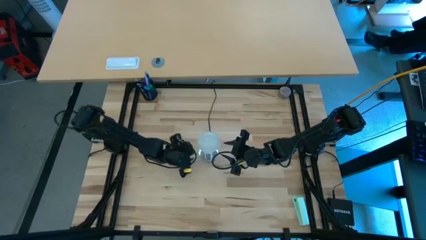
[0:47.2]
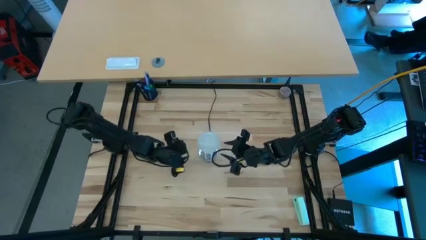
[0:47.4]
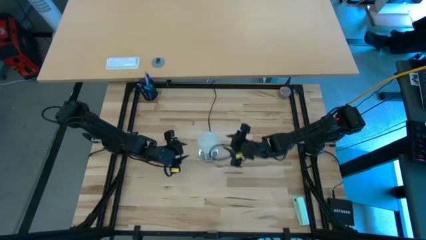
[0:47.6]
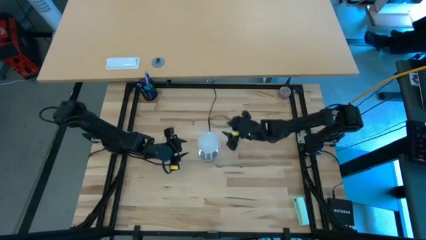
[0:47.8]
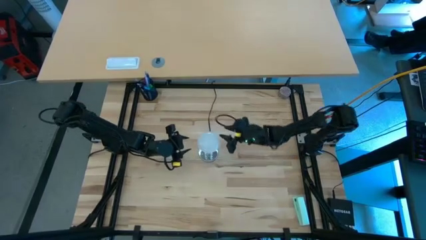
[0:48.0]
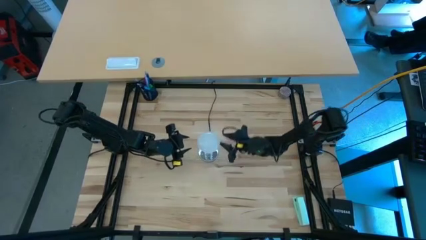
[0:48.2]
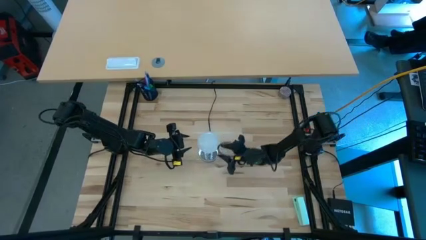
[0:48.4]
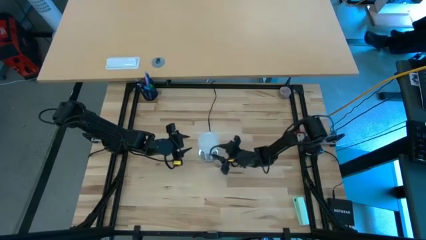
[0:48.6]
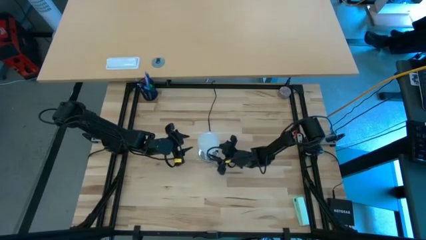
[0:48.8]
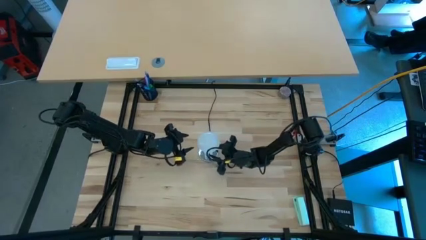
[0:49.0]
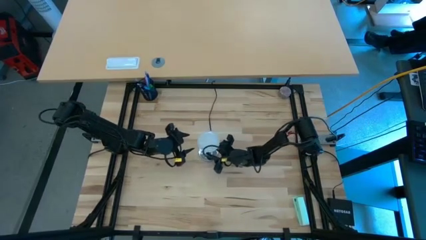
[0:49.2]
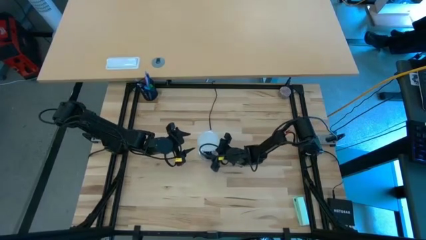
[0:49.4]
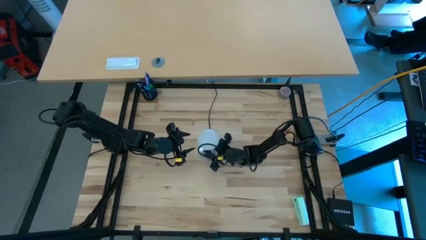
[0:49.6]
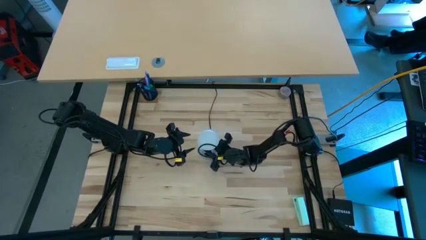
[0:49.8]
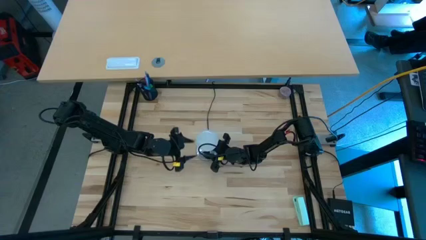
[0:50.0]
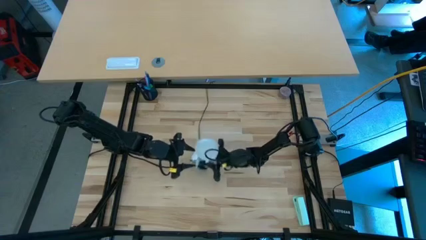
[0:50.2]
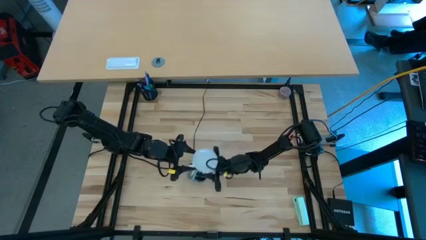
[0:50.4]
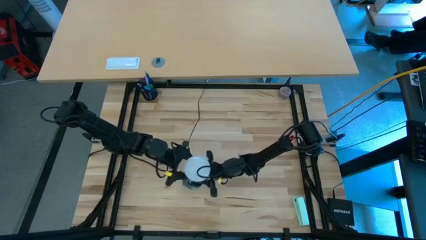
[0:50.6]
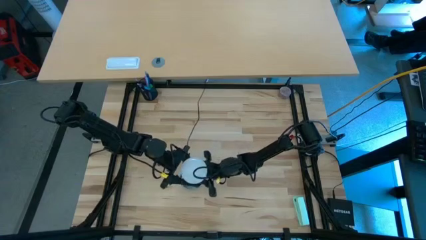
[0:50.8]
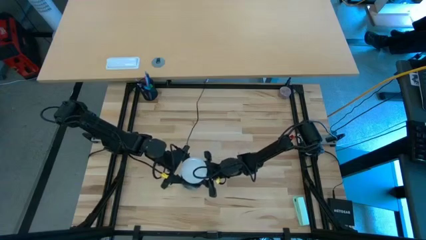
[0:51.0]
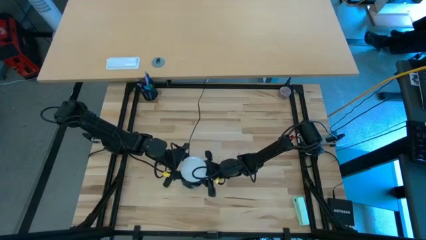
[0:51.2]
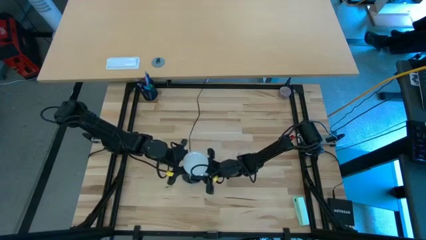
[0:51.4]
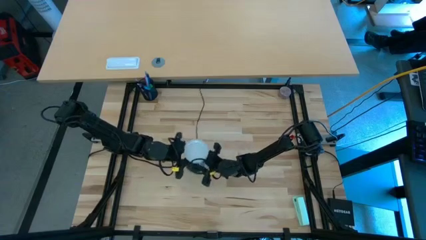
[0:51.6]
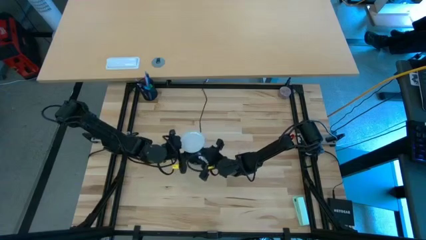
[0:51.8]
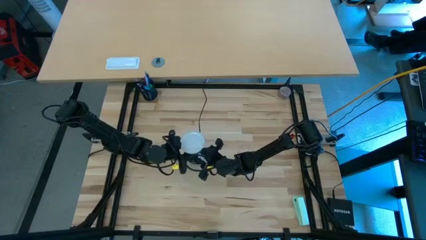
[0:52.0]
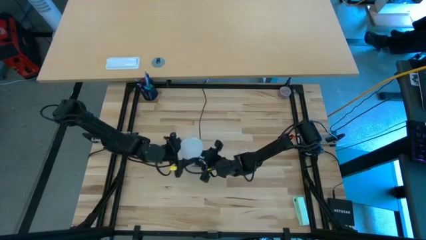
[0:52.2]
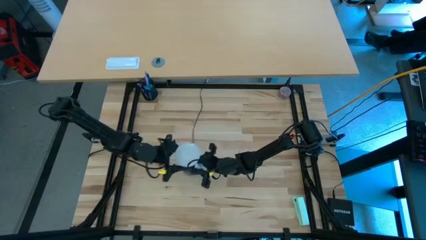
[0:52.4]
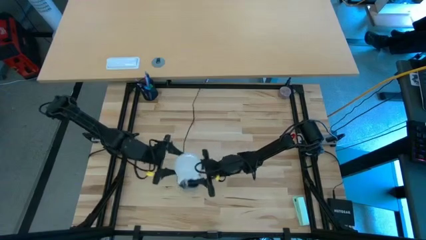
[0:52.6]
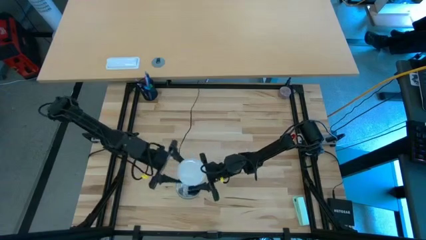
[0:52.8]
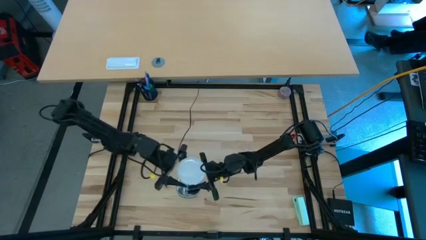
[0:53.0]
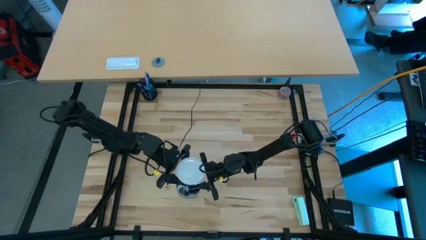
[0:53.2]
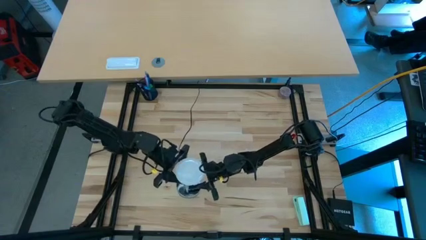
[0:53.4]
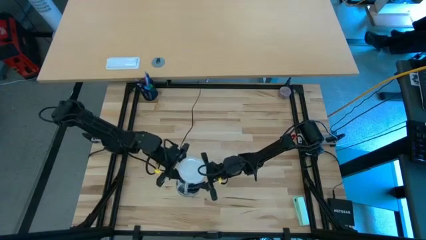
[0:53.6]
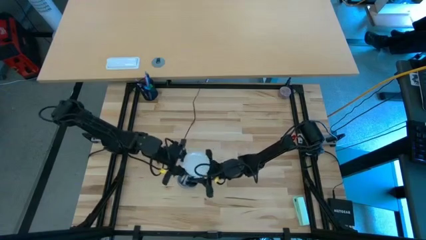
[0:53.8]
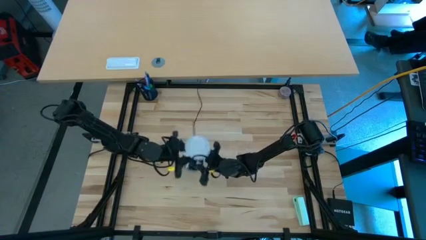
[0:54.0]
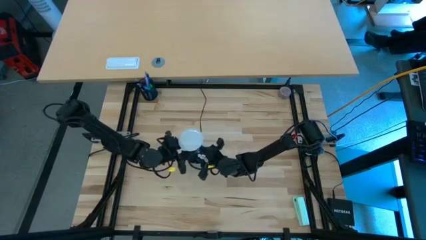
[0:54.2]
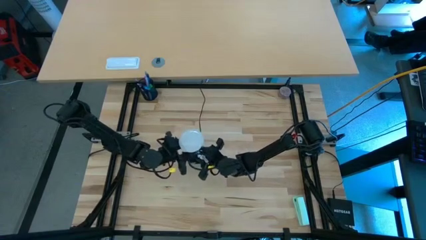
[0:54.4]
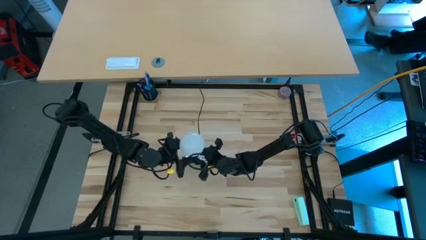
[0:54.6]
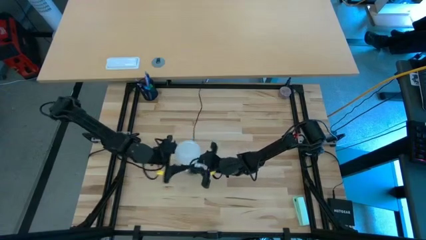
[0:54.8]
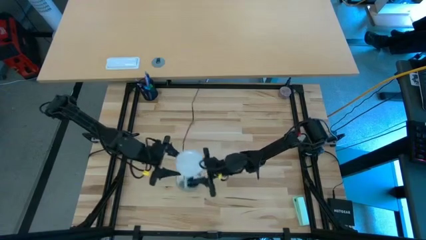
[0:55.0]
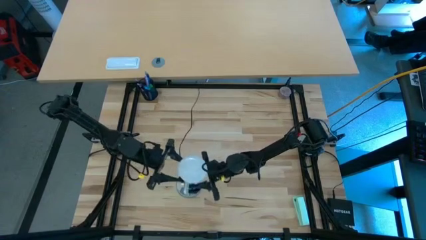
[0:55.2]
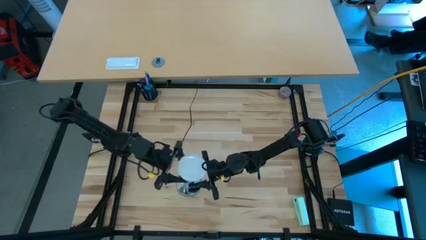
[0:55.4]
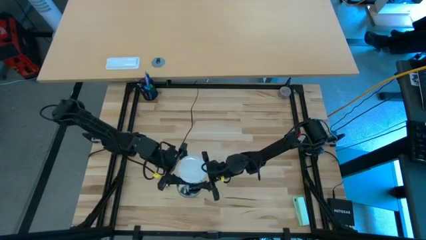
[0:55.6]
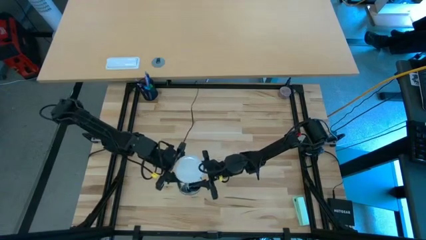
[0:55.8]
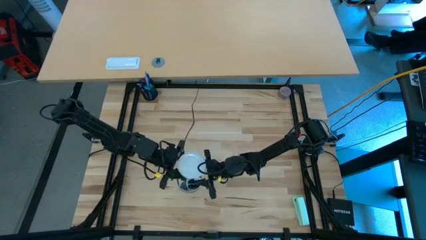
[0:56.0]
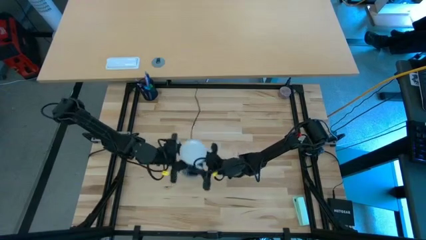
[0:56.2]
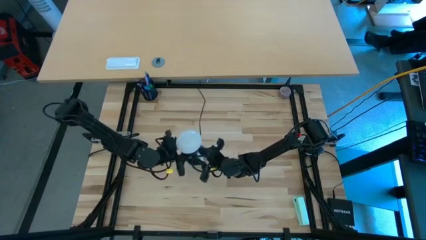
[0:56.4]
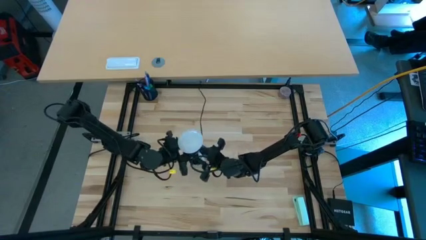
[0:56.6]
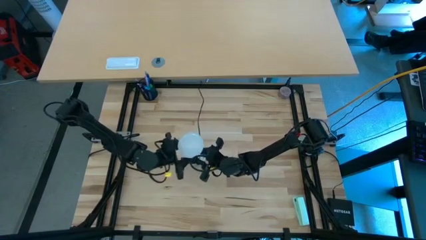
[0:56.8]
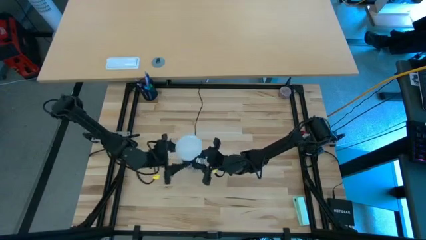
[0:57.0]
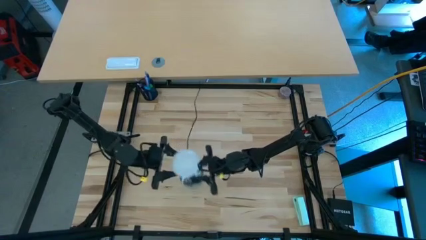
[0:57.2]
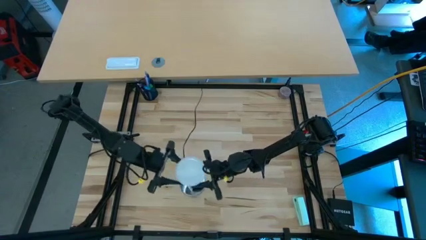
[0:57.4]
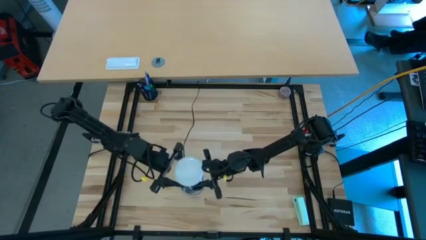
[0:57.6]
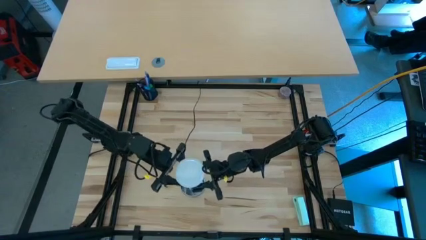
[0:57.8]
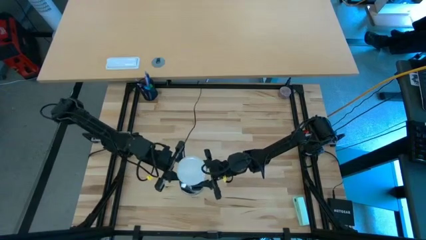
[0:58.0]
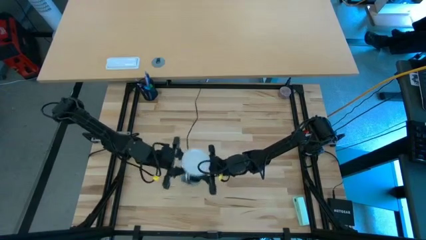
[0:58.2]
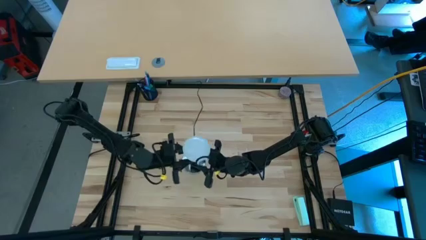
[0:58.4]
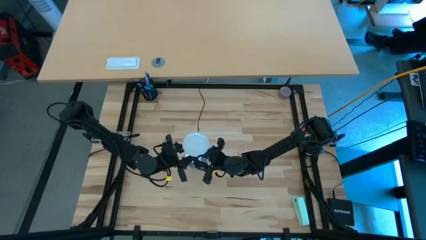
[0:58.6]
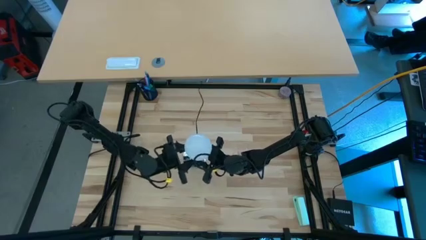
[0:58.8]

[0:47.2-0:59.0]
Task: Screw lightbulb
Remove the lightbulb from the lamp
